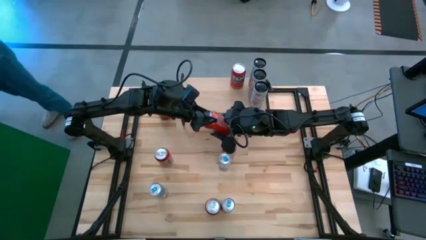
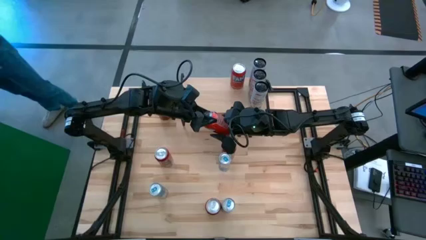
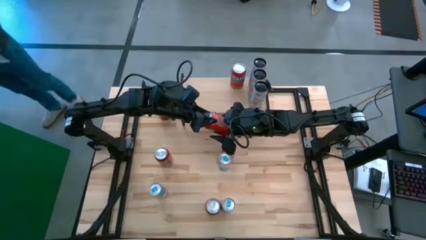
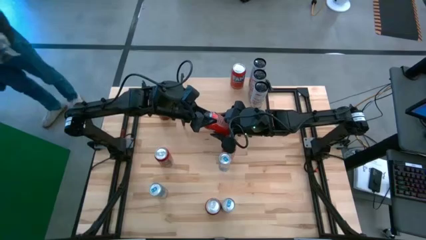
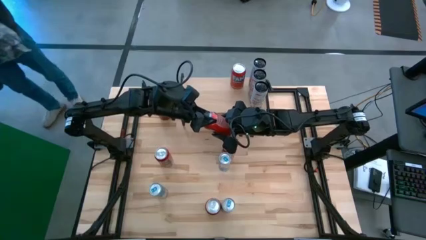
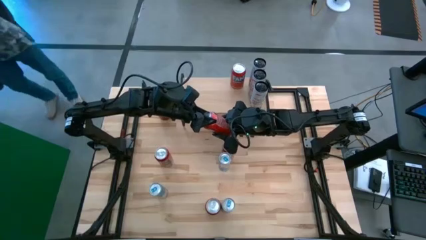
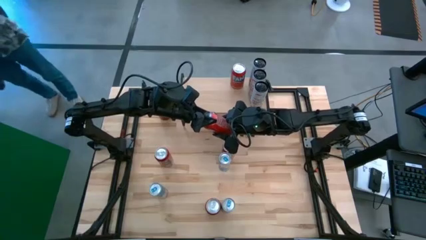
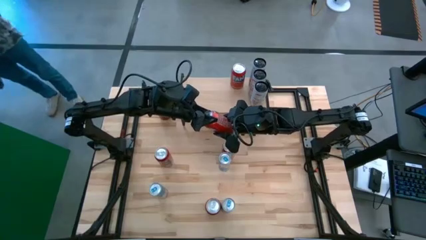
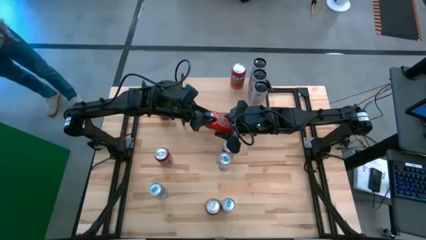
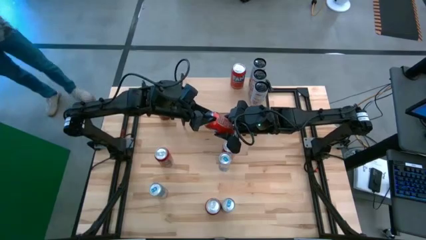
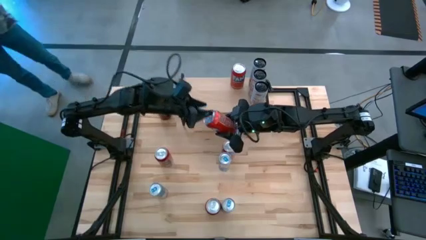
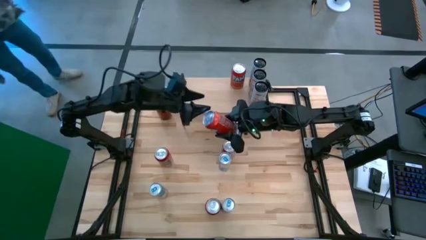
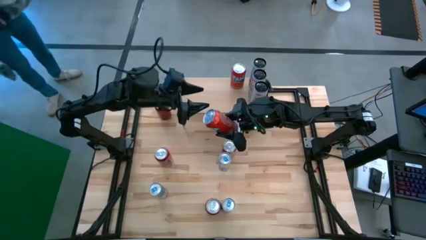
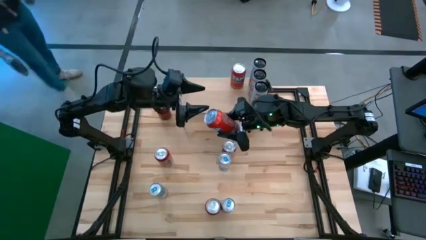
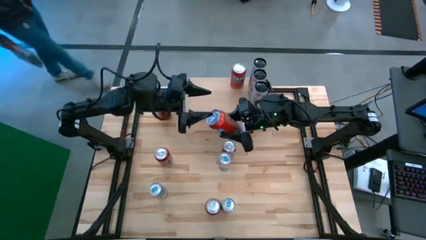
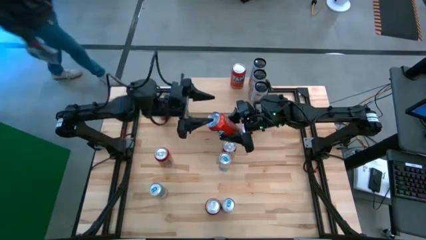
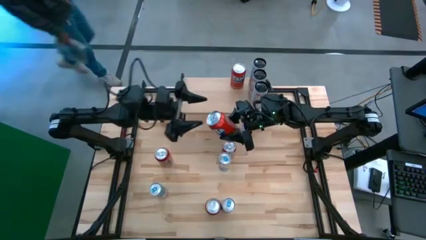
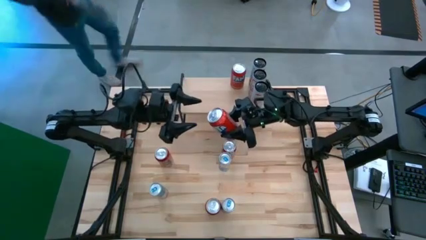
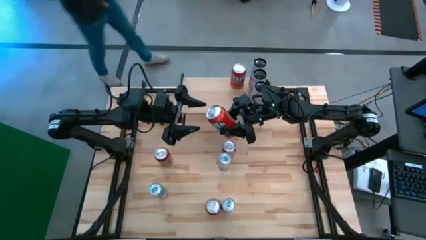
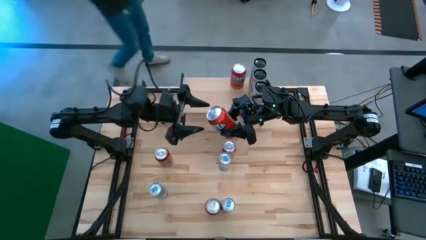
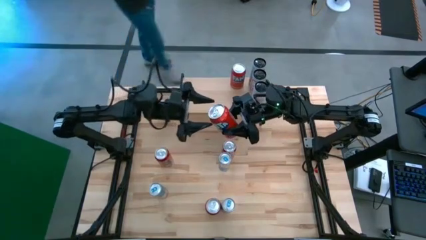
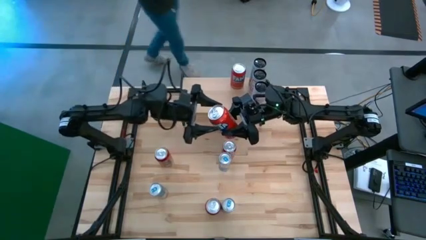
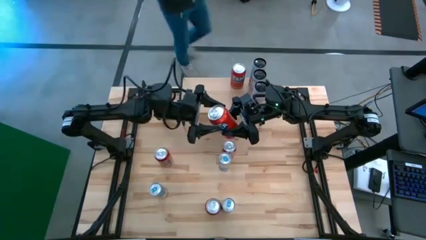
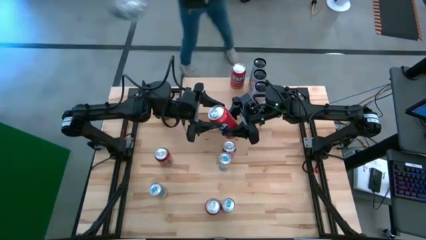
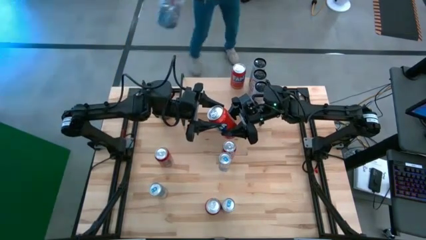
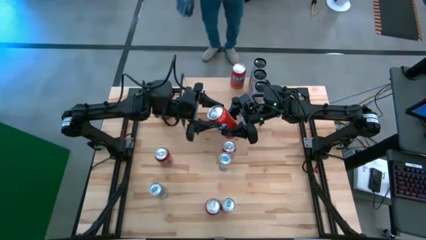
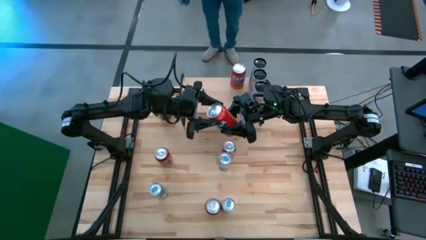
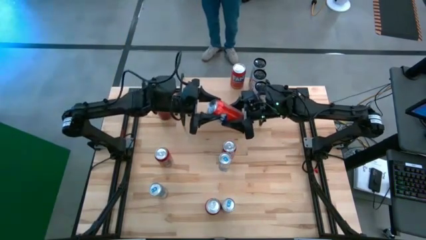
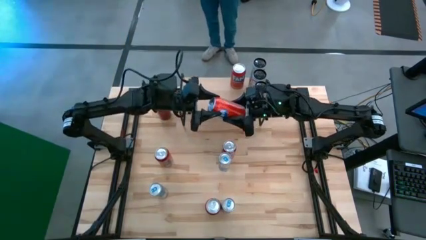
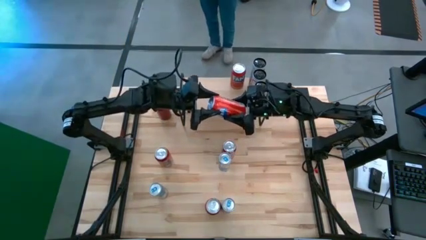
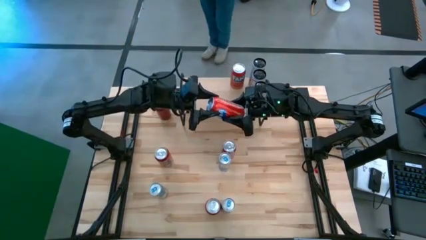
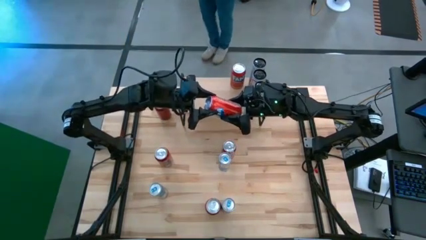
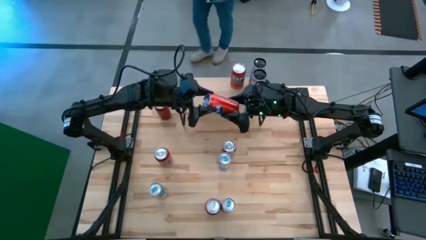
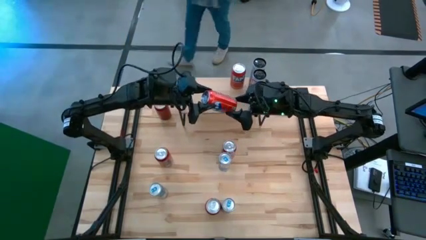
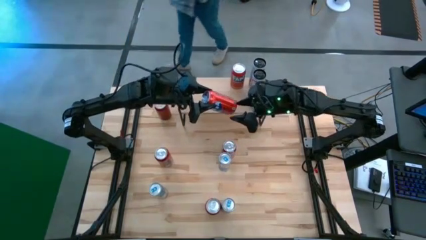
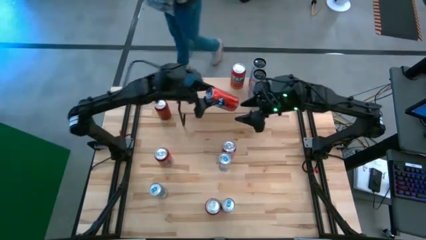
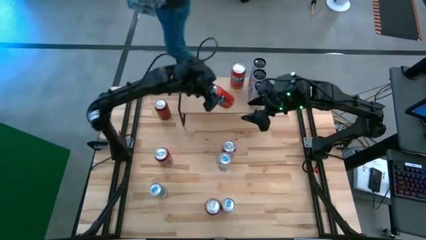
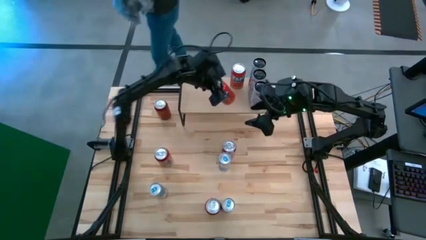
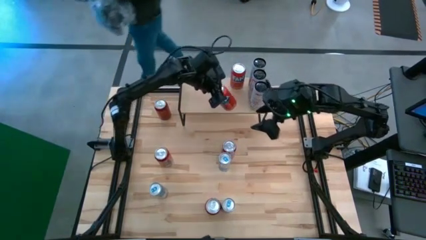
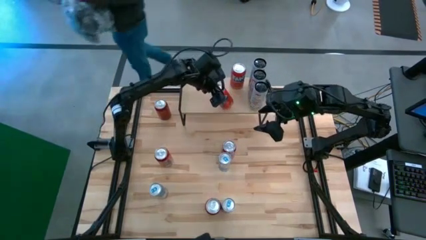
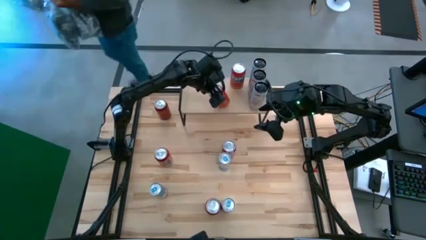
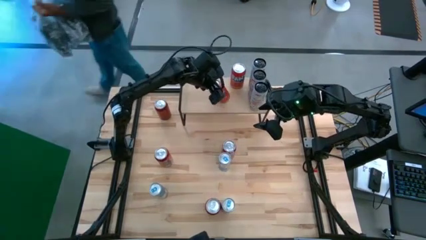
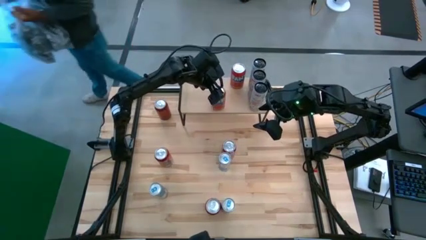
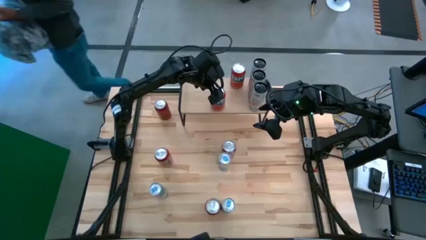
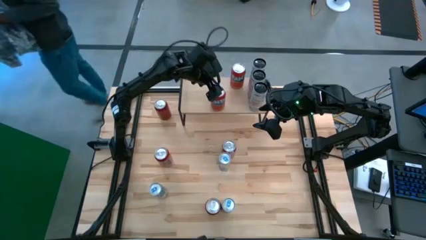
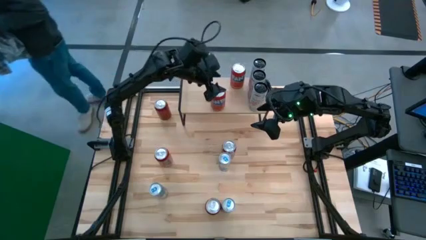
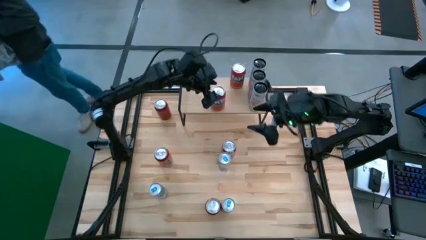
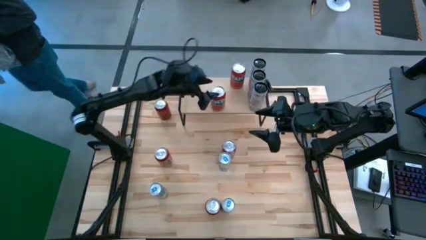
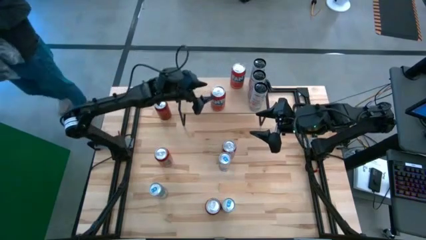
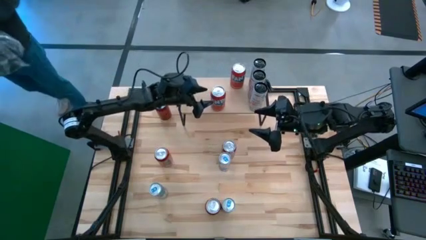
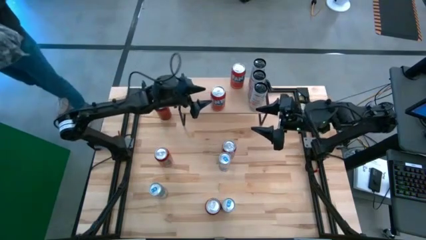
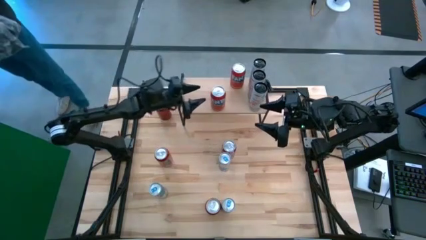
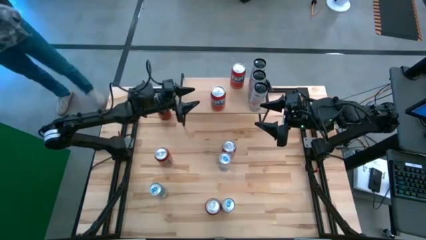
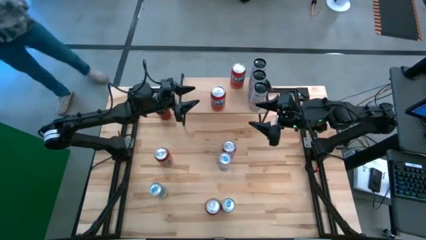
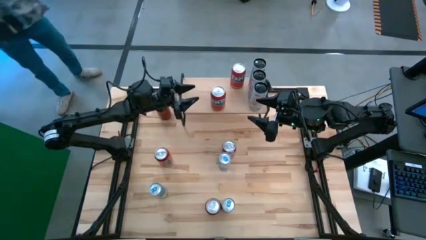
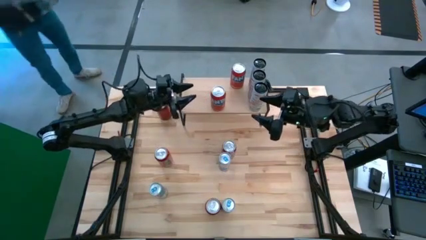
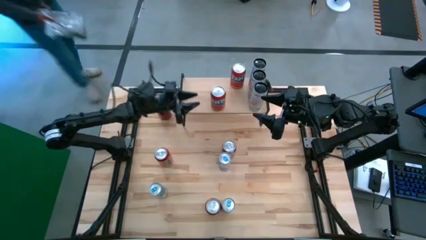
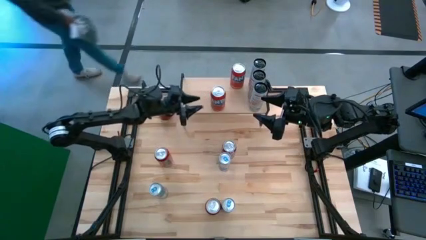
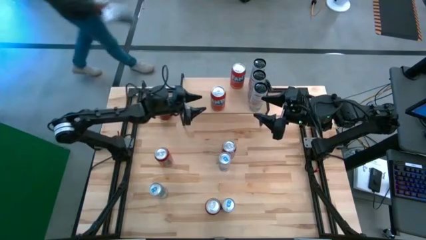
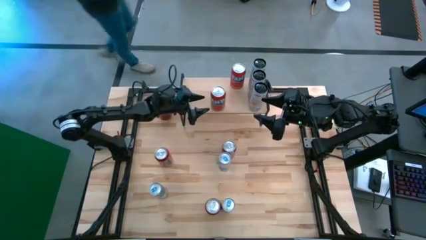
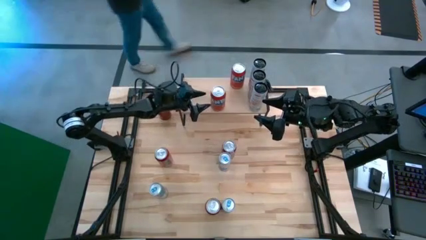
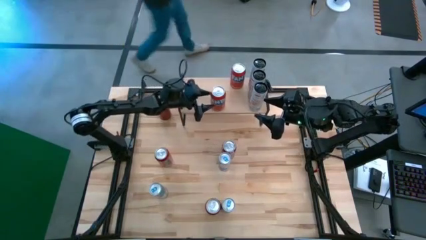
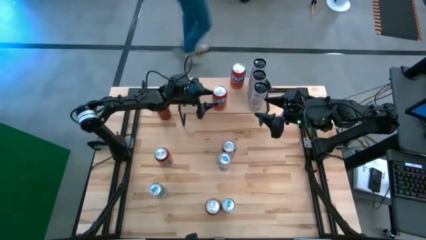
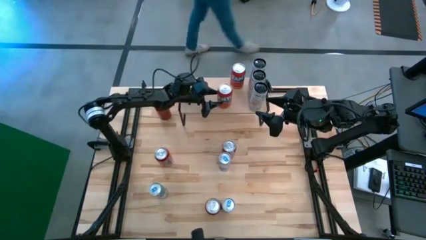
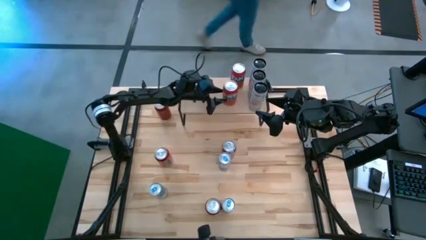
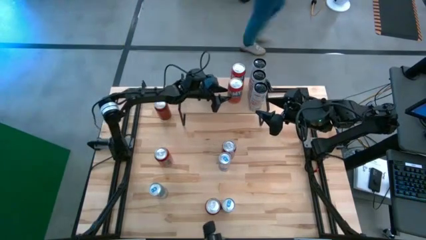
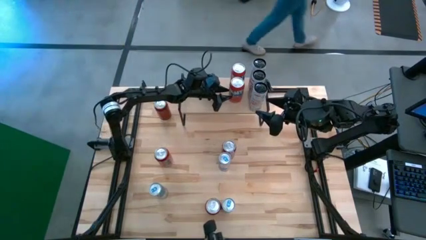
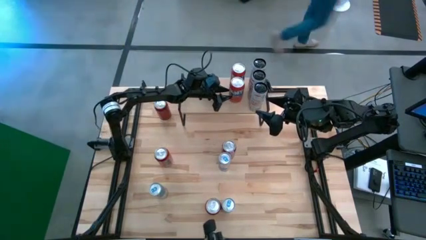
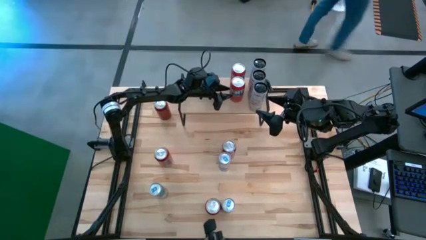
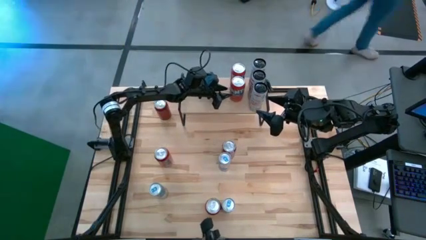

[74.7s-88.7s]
Task: Place canned beverage on shelf
Put the top red soda can aligned with the other red soda can on the shelf
